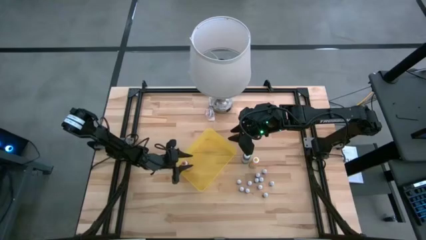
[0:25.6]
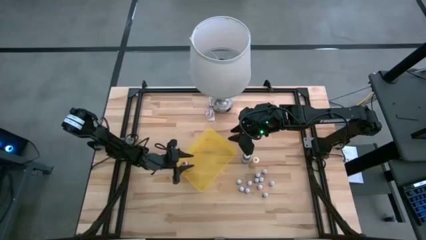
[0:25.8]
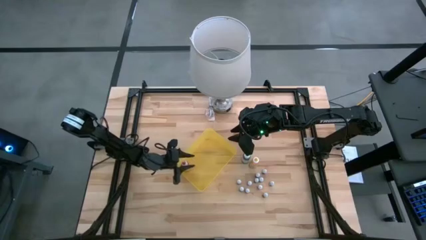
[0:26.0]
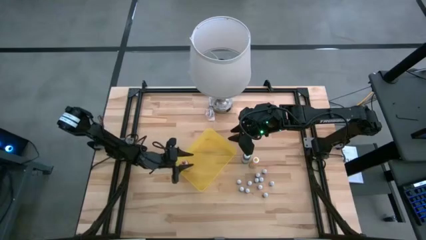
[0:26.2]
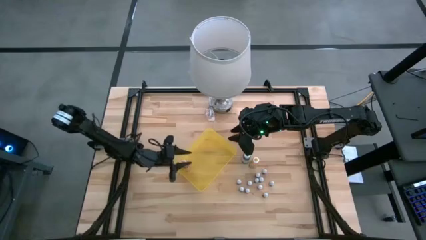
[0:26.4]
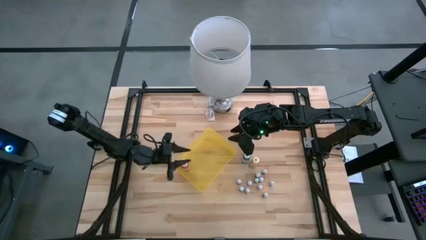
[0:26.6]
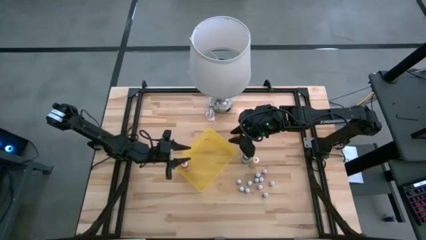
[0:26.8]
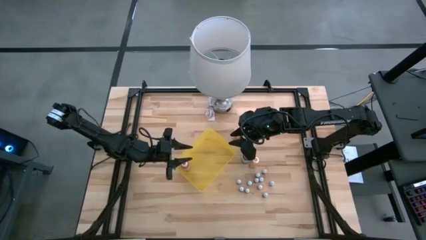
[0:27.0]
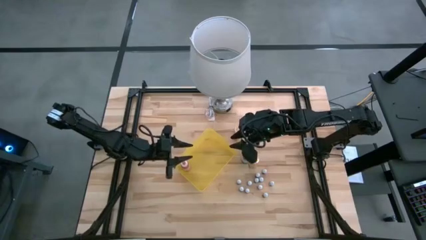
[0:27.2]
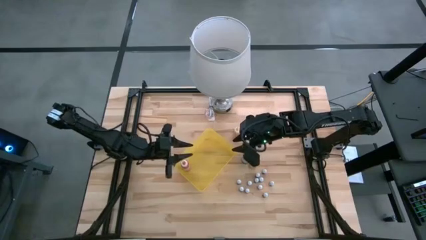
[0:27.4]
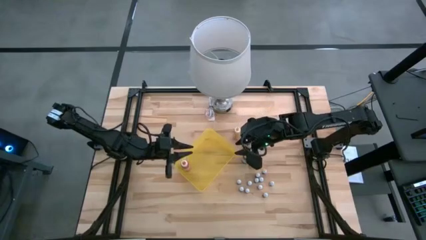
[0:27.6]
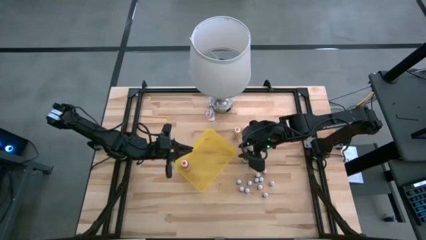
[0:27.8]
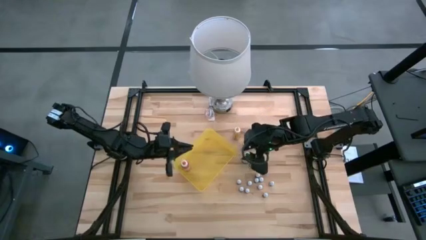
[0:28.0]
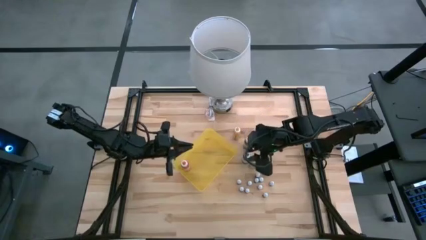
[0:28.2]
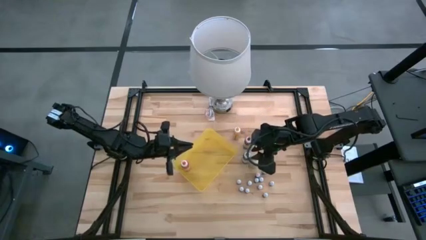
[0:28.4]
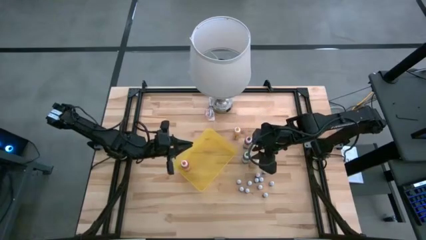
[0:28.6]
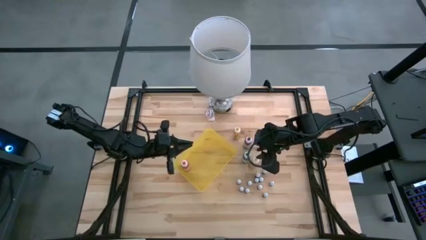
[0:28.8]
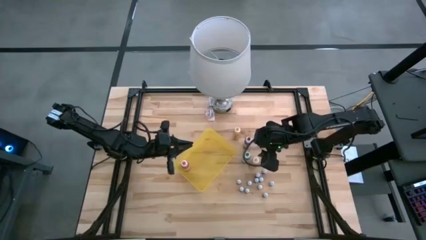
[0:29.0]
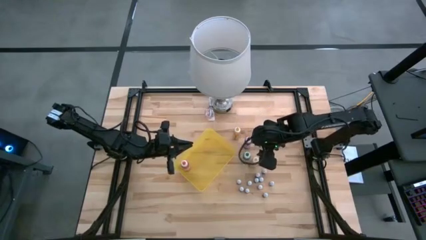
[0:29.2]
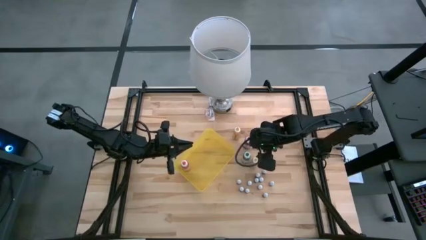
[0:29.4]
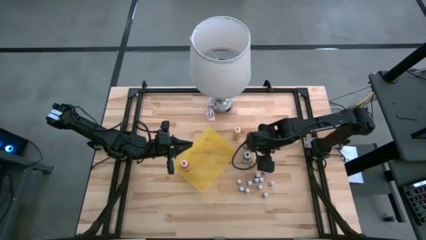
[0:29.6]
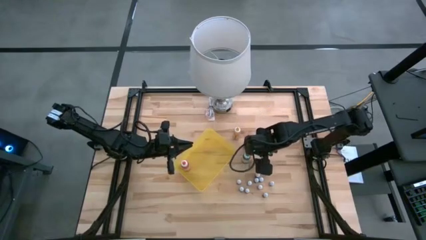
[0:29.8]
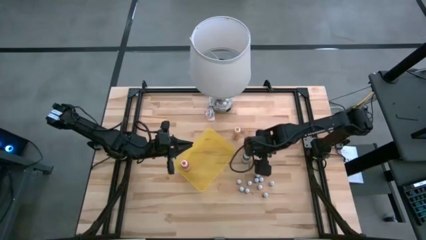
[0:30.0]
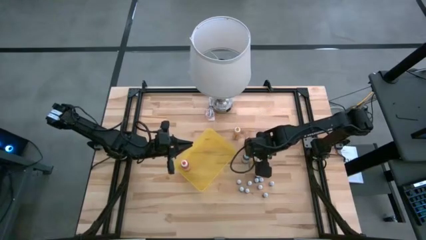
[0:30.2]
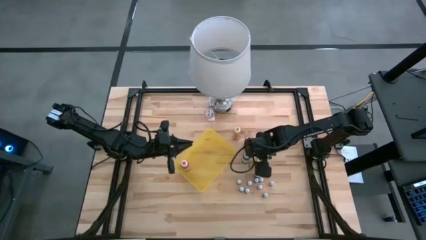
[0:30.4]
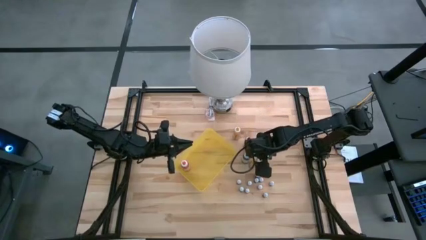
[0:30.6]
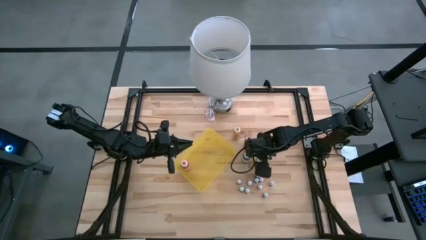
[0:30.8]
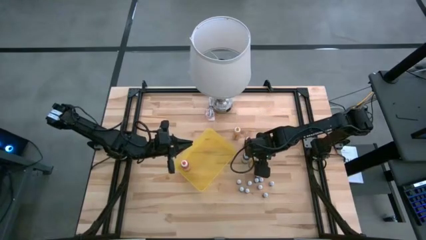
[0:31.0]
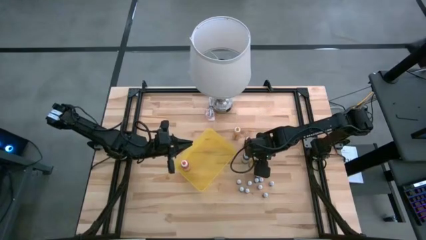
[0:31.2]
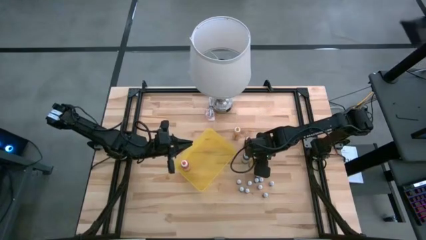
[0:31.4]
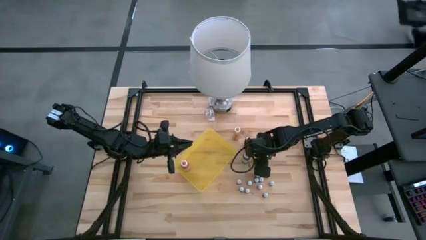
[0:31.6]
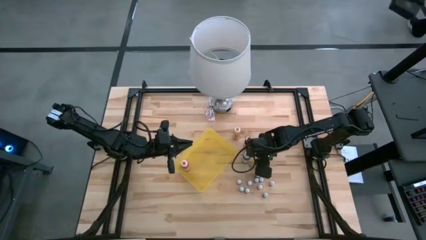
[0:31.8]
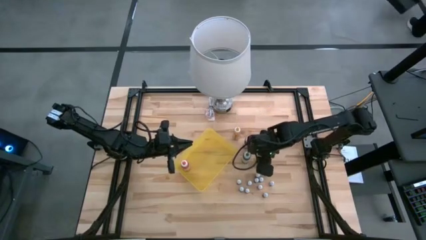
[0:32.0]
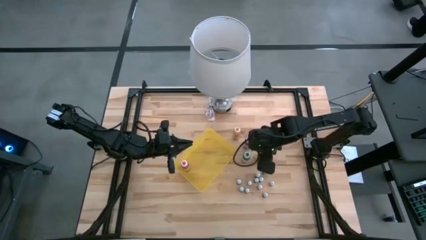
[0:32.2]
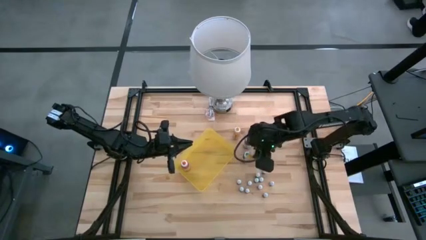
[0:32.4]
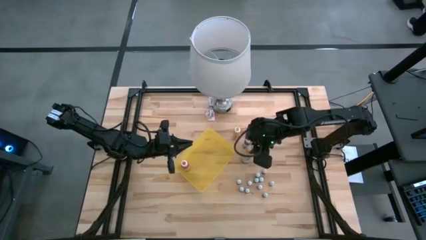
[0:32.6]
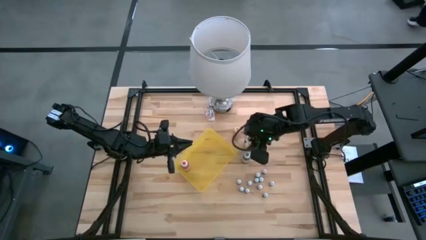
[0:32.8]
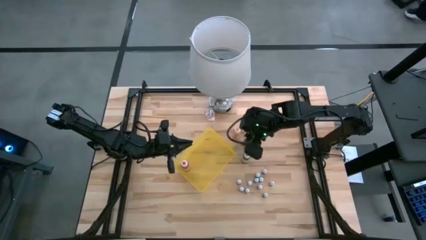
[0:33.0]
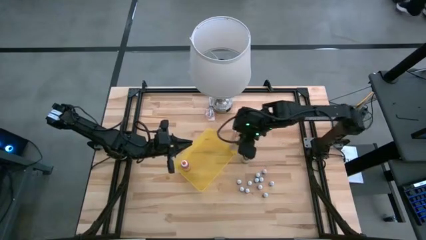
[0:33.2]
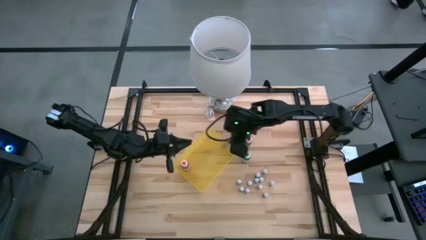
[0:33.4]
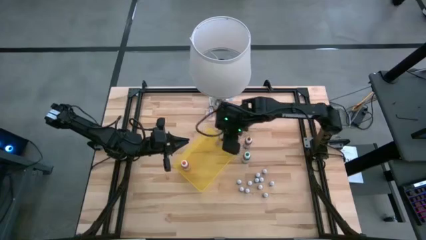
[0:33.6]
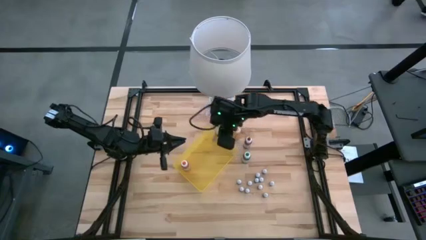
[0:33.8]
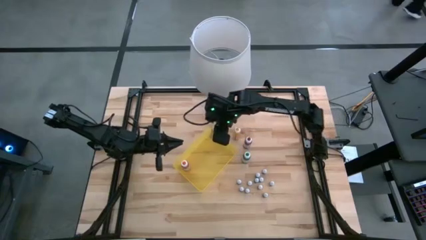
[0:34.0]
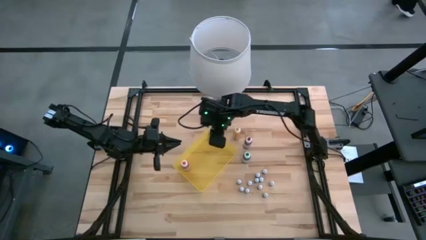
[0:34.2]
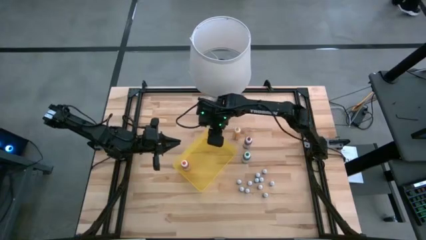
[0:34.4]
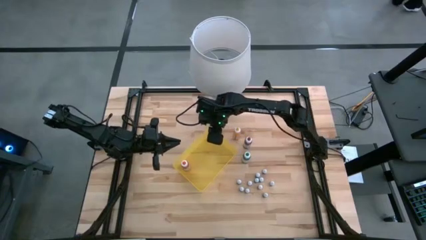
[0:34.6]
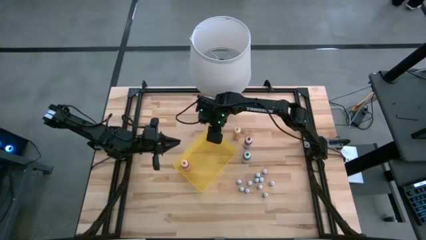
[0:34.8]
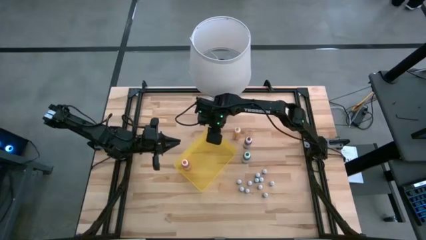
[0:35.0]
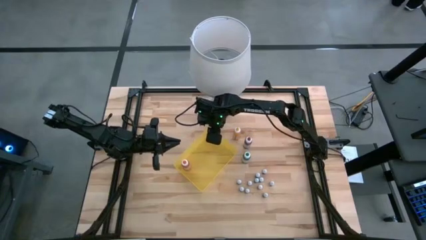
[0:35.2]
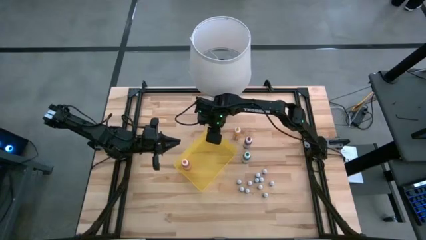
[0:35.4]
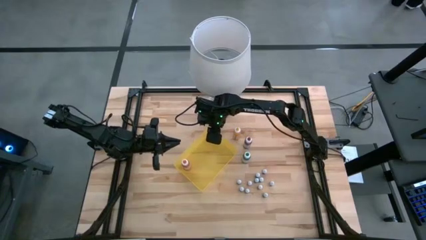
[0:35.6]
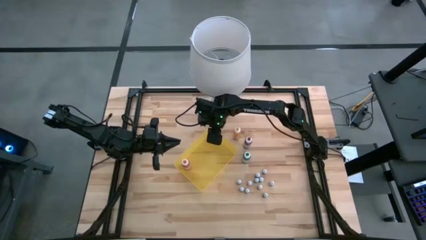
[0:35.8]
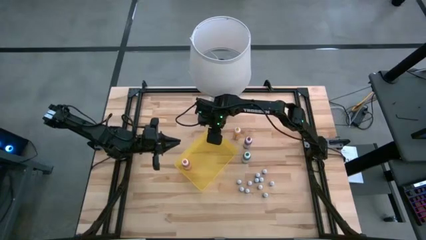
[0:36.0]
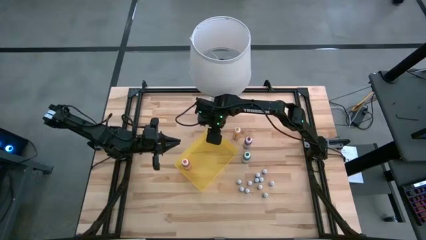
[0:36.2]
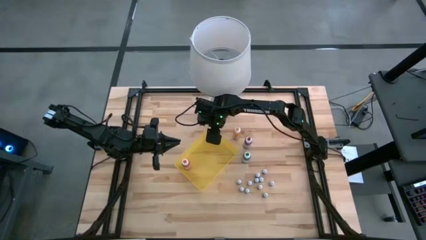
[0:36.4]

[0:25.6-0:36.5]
Task: Pick & Place food coloring
Put the bottom large yellow food coloring bottle into the yellow bin
